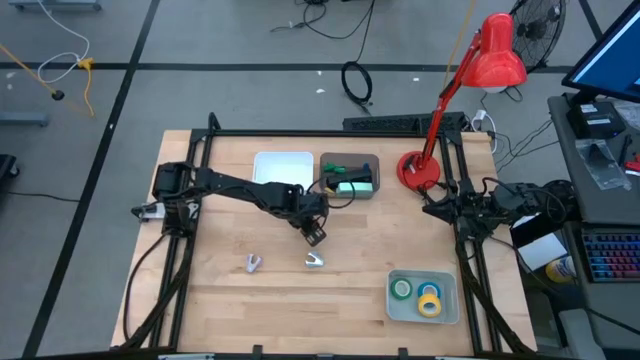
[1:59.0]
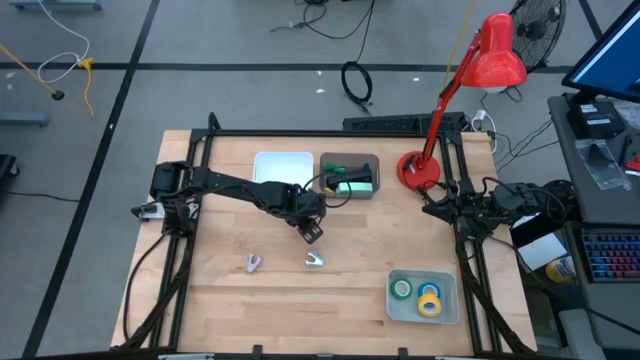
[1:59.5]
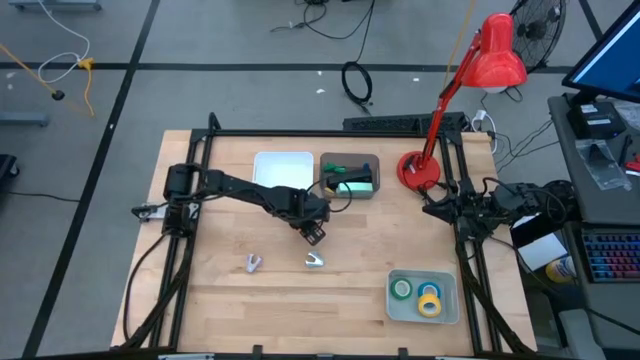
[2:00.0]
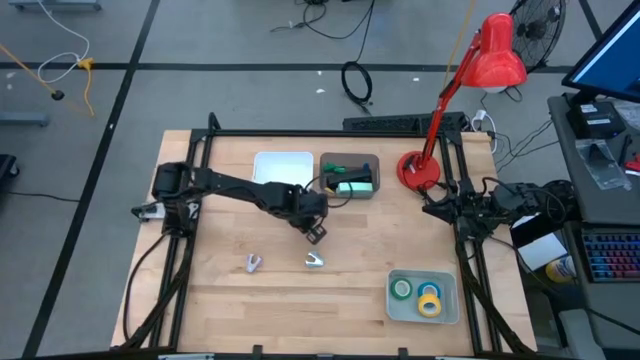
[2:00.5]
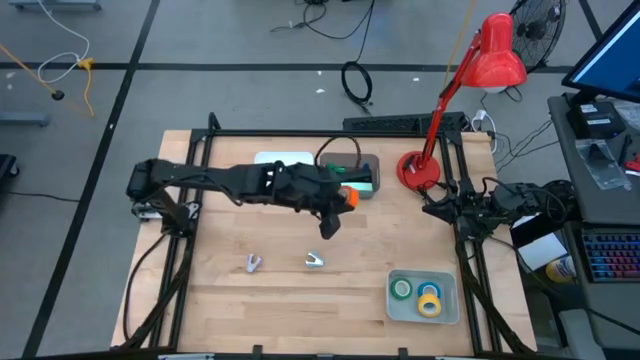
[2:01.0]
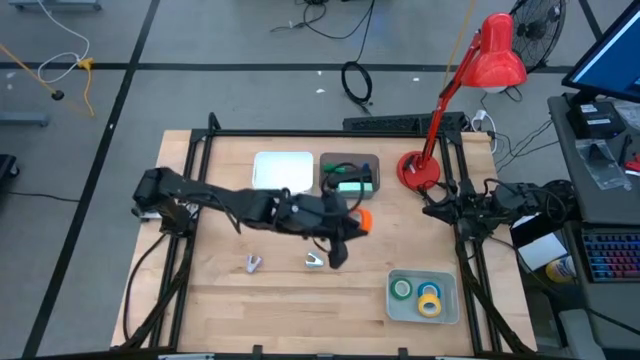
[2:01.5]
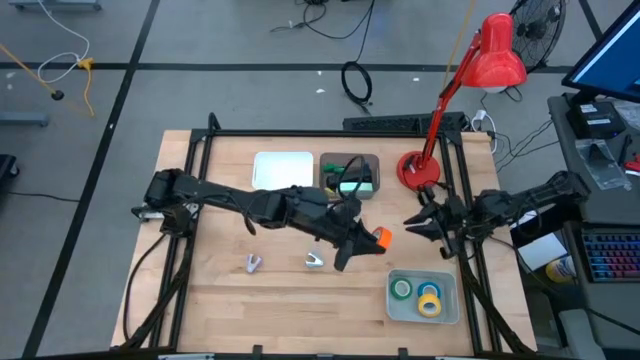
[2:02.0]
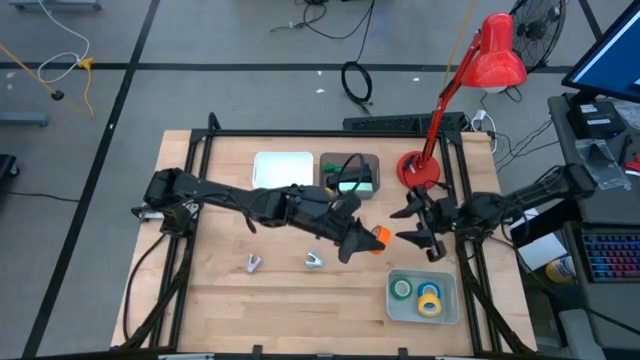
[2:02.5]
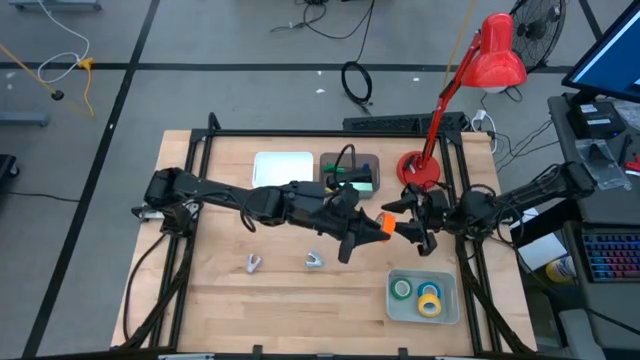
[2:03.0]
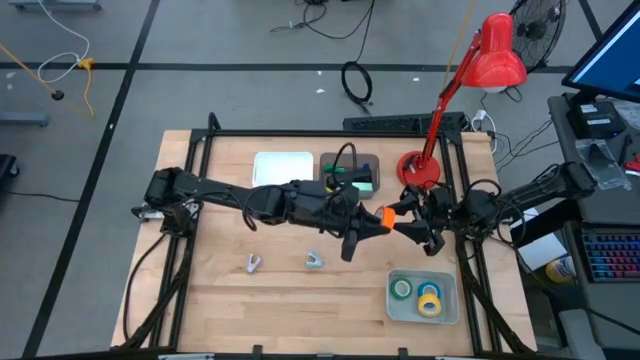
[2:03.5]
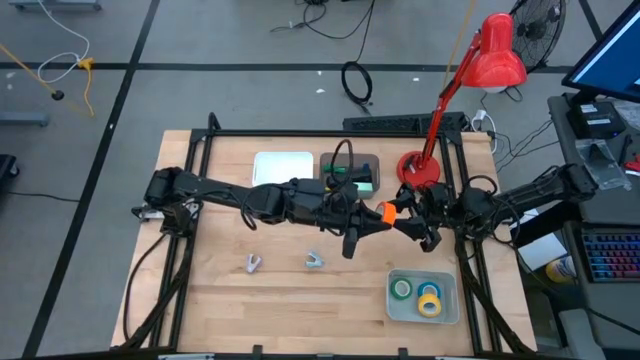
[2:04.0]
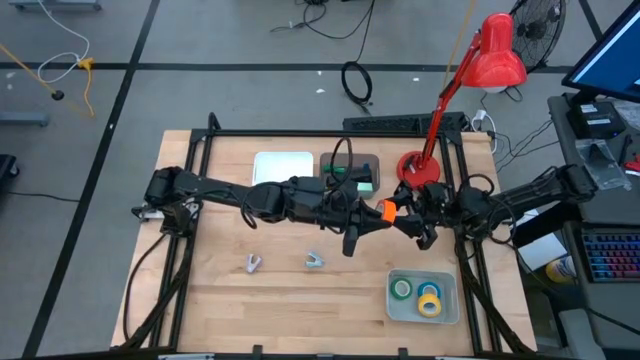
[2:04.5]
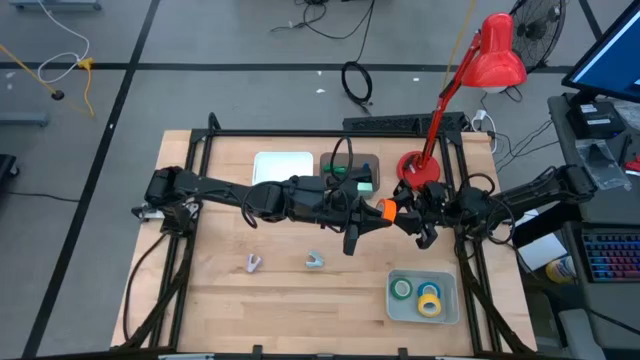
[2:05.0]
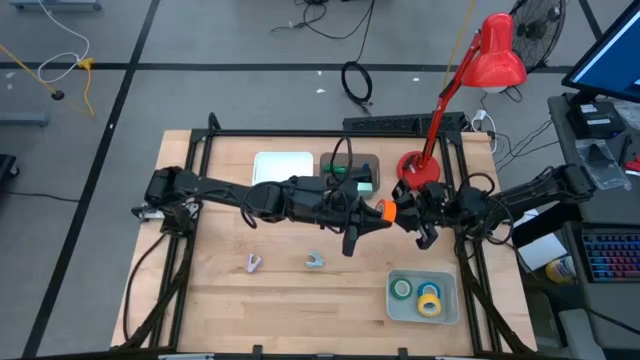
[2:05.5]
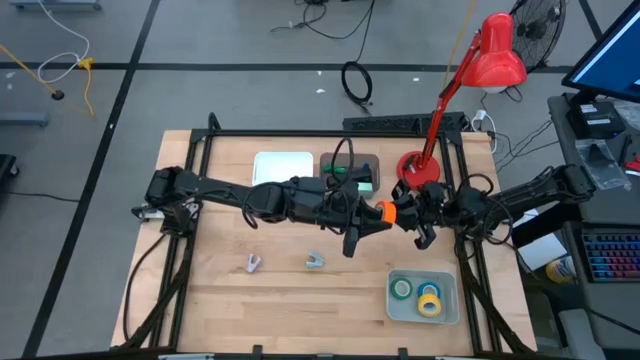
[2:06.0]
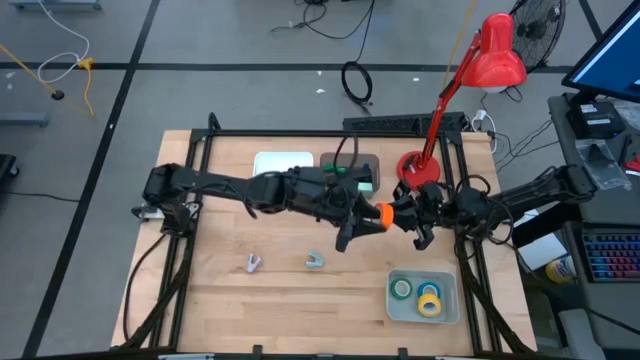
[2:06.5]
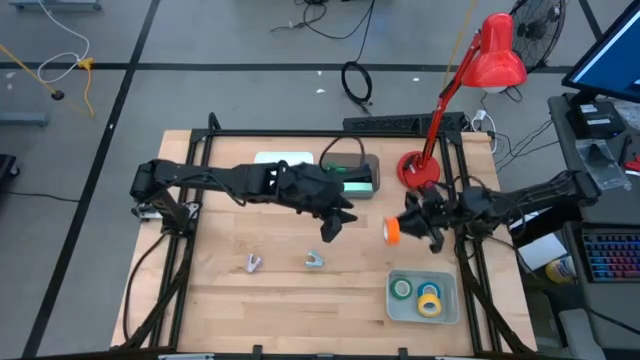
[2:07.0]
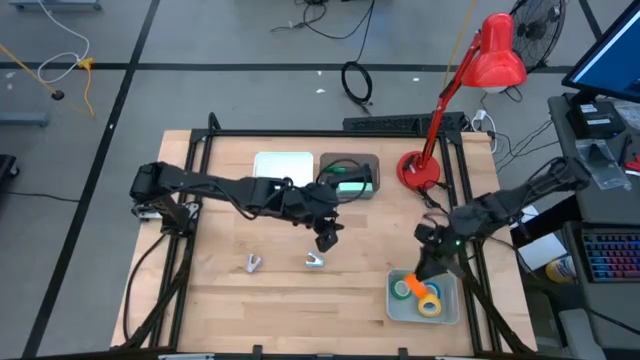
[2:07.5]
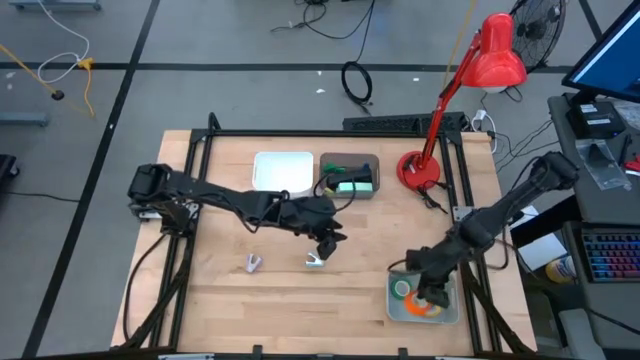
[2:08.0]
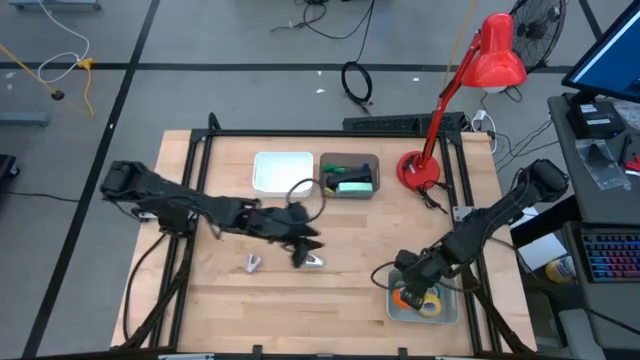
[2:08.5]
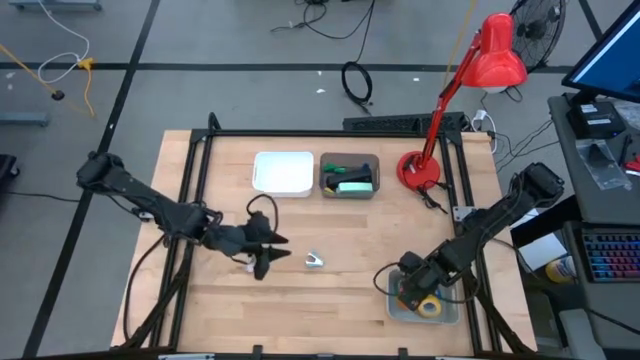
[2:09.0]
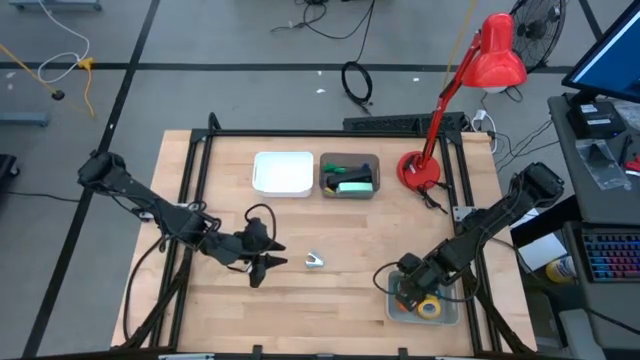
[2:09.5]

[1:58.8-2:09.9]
Task: Pick and place Stapler, Stapler remover, tape
Put the orange tape into the gray bin

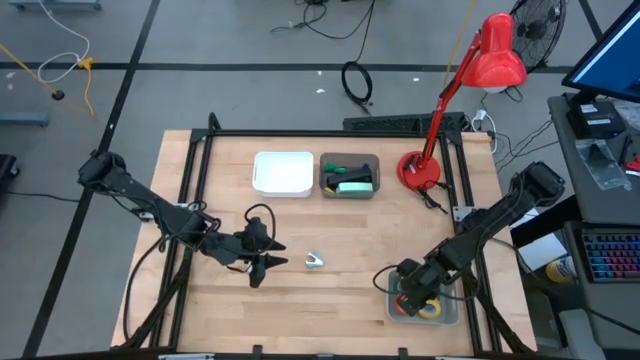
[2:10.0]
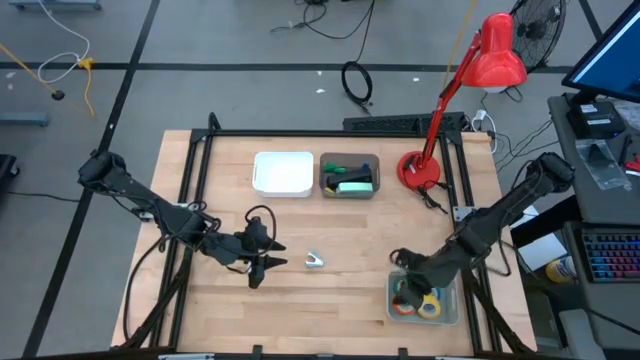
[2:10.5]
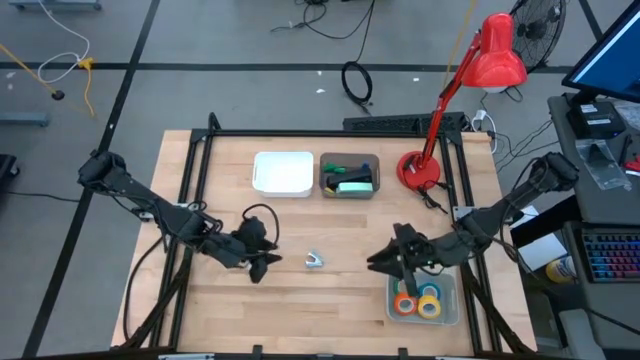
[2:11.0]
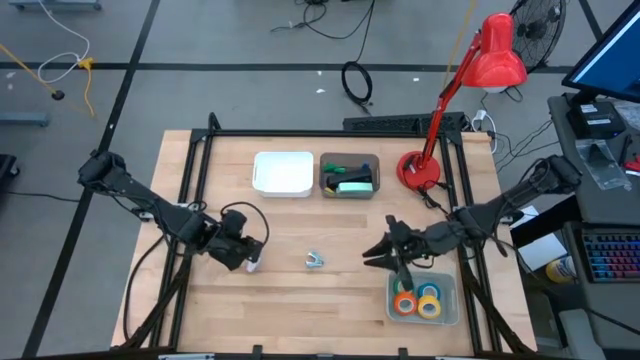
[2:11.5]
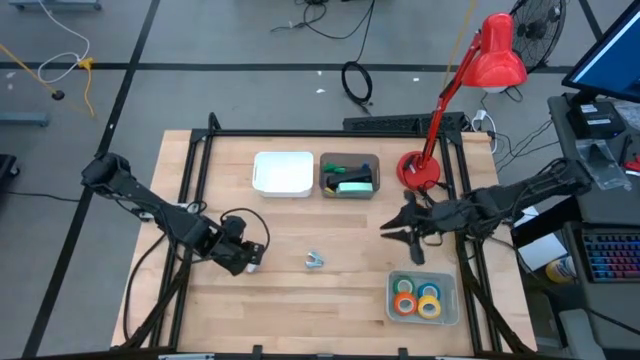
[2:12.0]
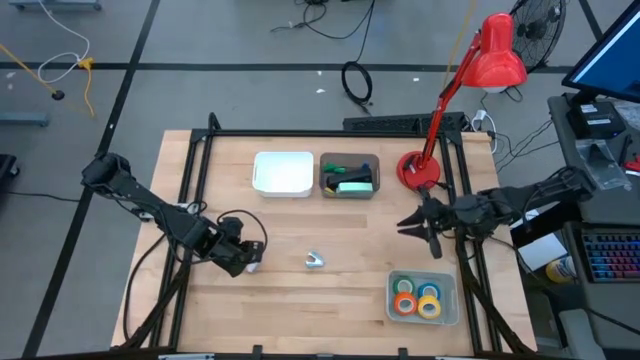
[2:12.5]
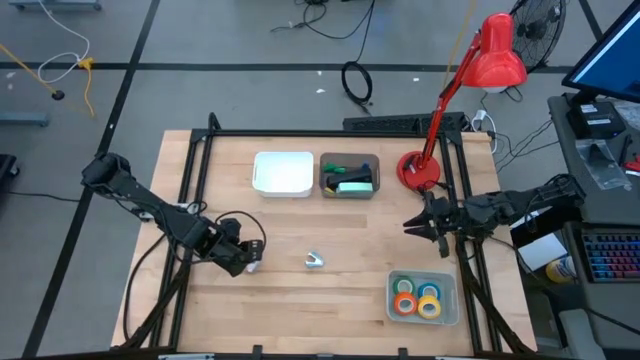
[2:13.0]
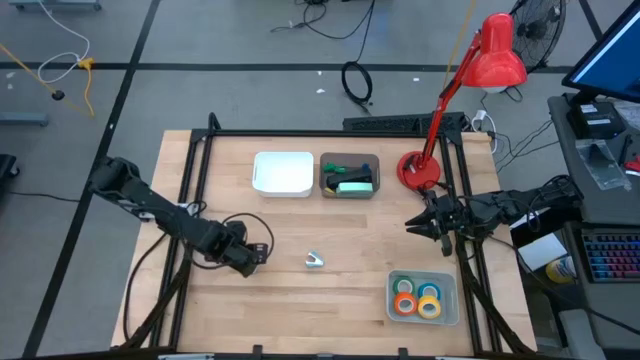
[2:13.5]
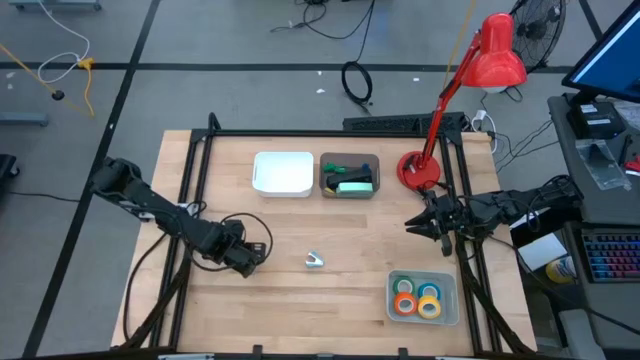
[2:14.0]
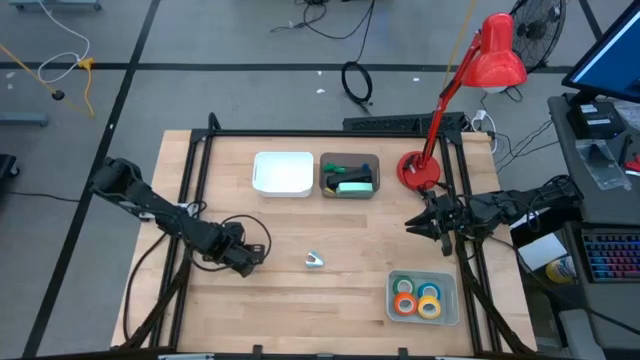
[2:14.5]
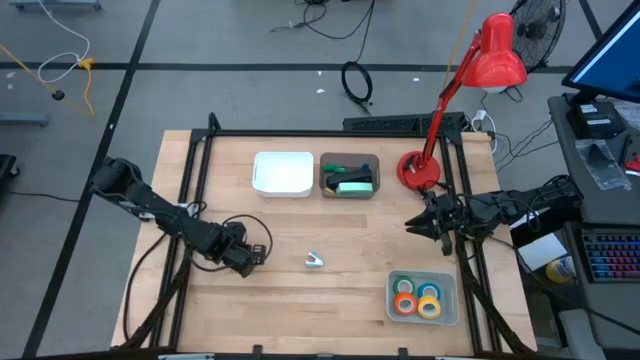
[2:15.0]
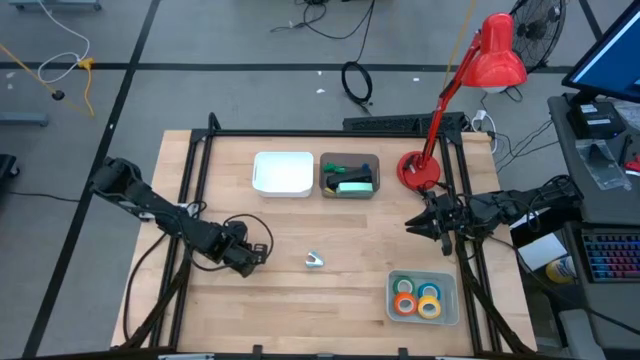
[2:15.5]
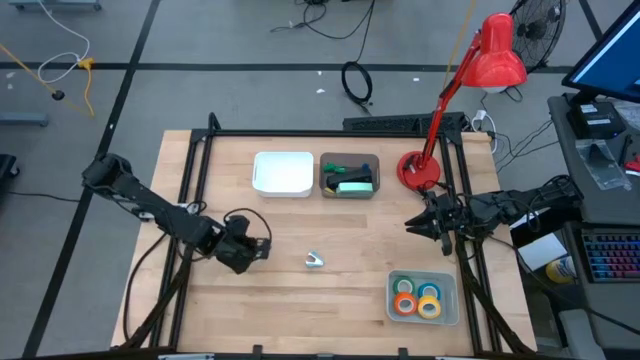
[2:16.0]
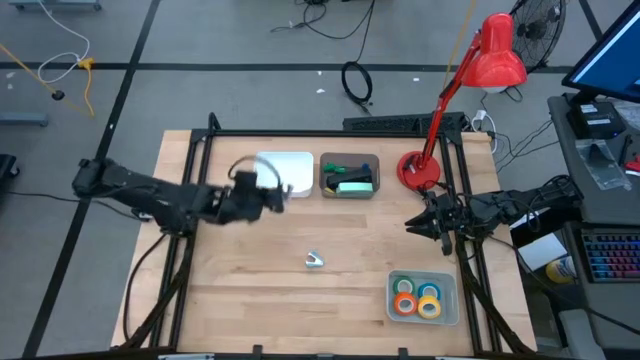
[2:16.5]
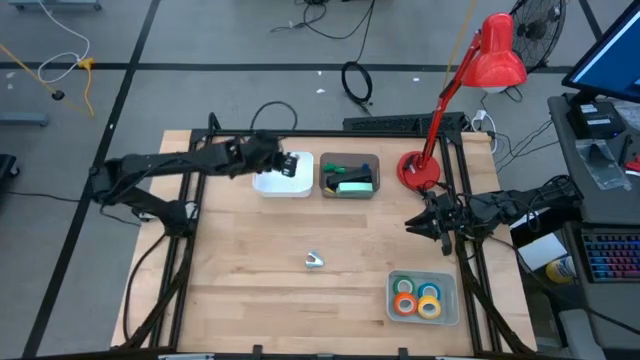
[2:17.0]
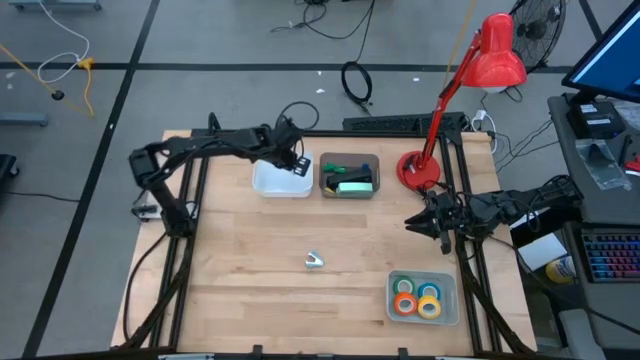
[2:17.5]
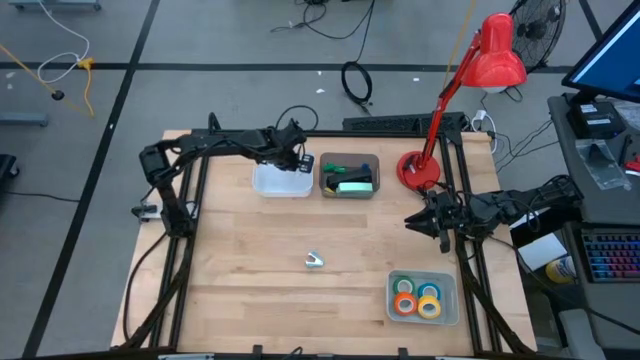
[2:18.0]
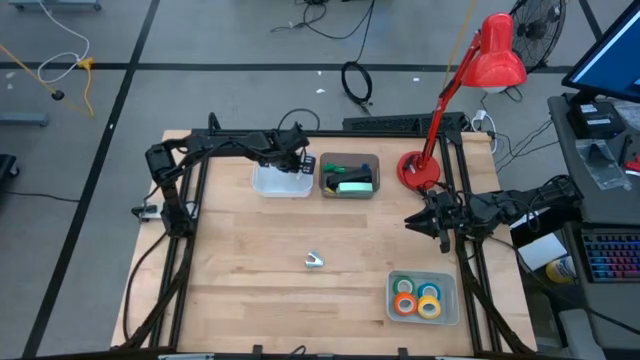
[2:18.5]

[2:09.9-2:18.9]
Put the purple staple remover into the white bin
